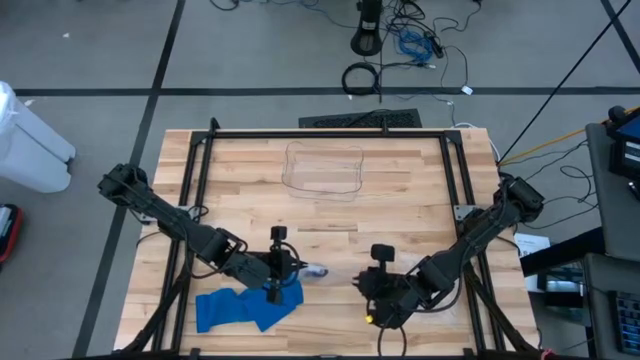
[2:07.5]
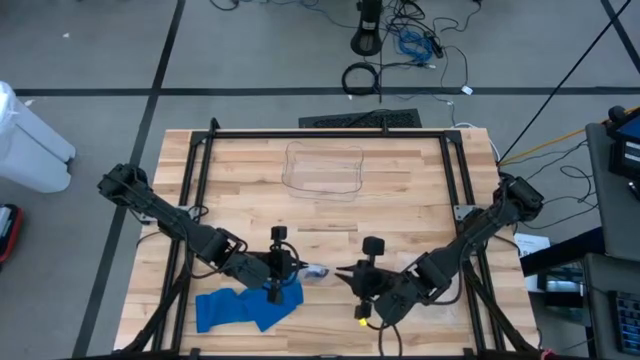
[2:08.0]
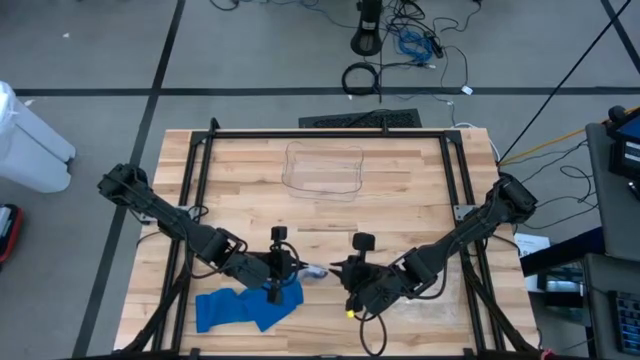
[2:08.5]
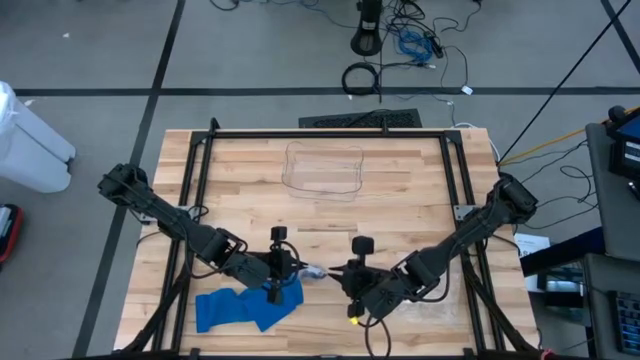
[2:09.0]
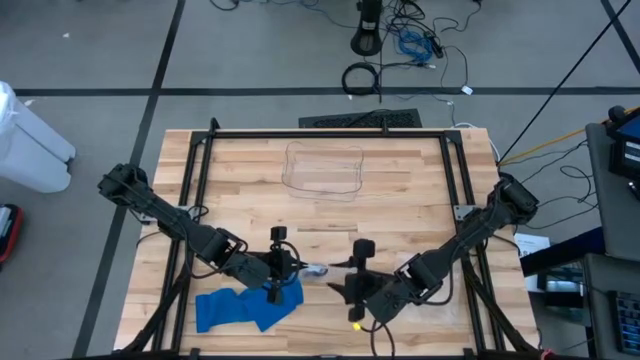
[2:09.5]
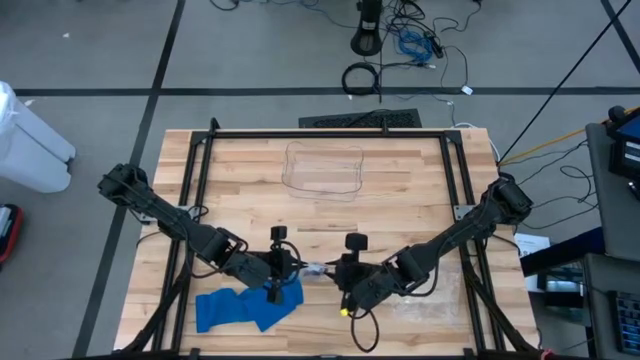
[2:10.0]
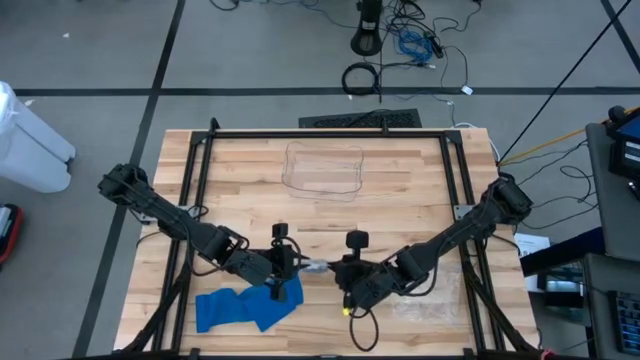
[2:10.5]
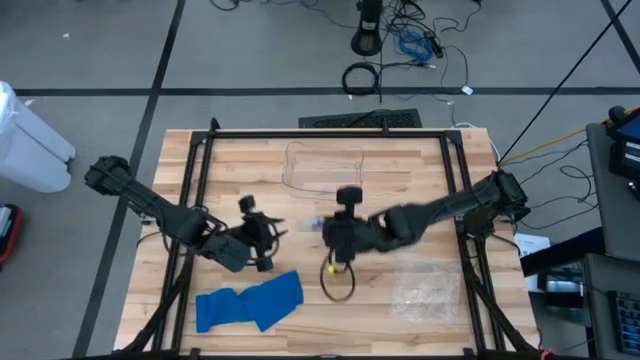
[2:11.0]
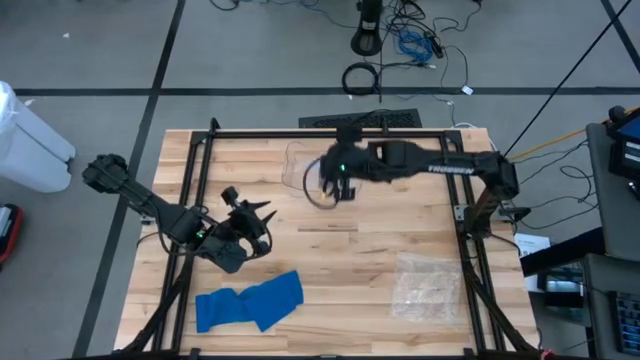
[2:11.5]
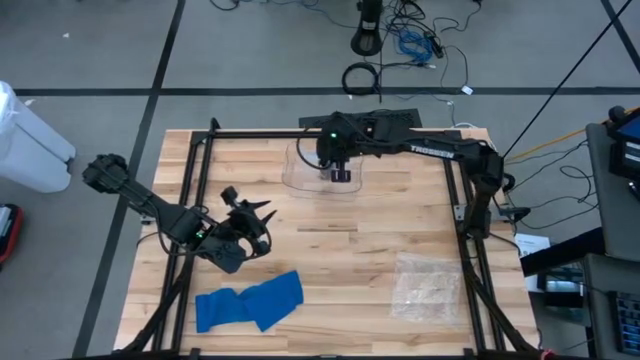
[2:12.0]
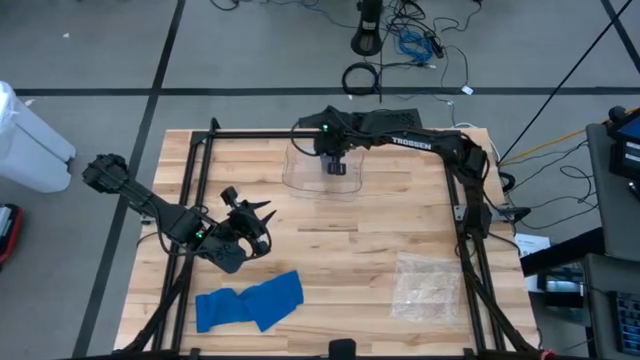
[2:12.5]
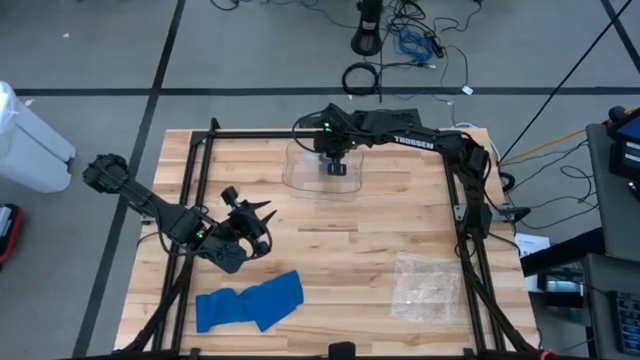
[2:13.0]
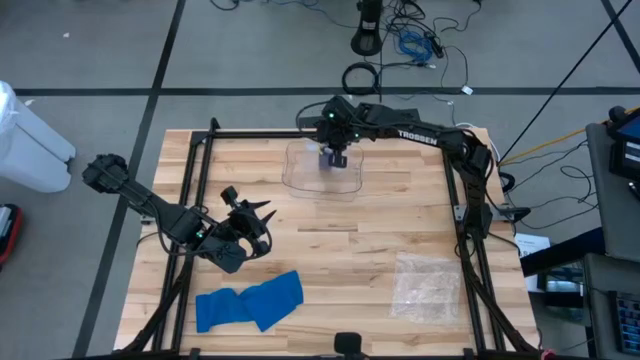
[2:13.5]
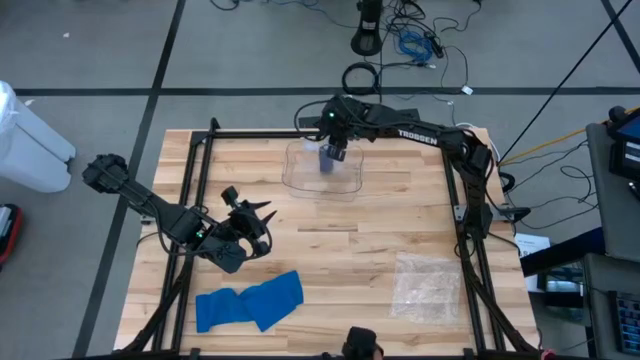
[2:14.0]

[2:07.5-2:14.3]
Task: Roll bandage
Put the transparent zip bag with the rolled purple bandage into the transparent bin

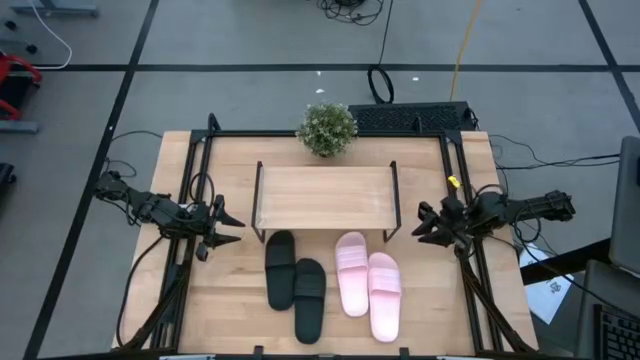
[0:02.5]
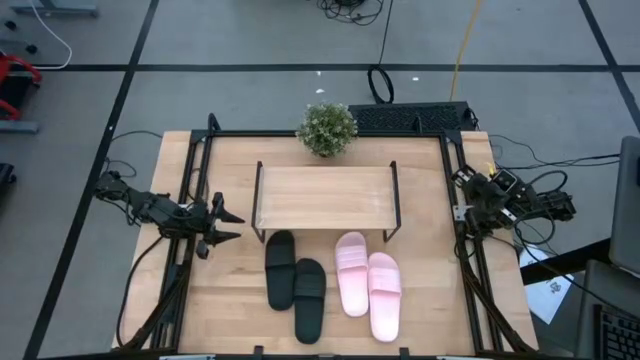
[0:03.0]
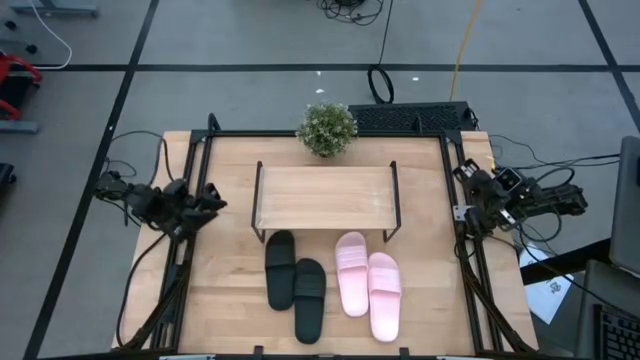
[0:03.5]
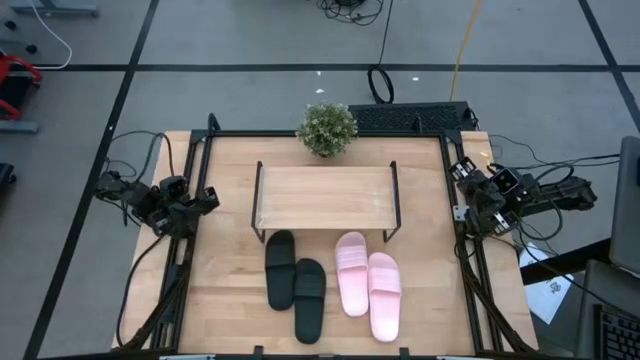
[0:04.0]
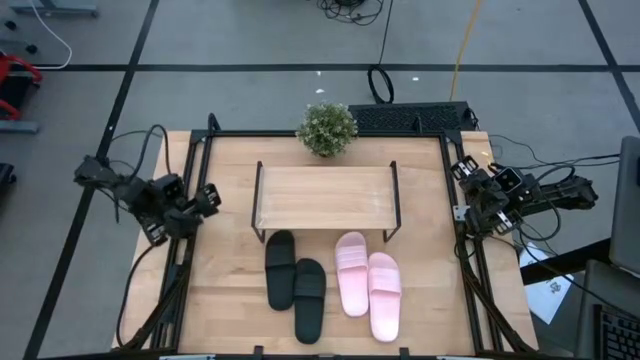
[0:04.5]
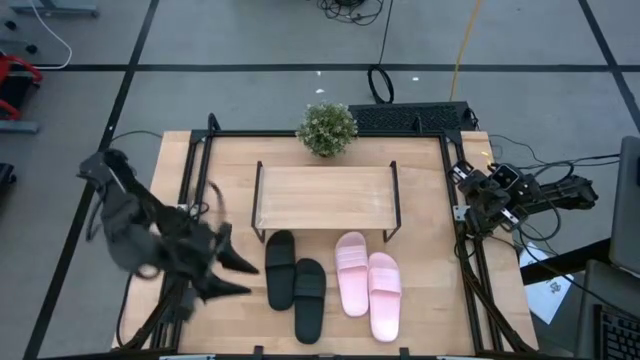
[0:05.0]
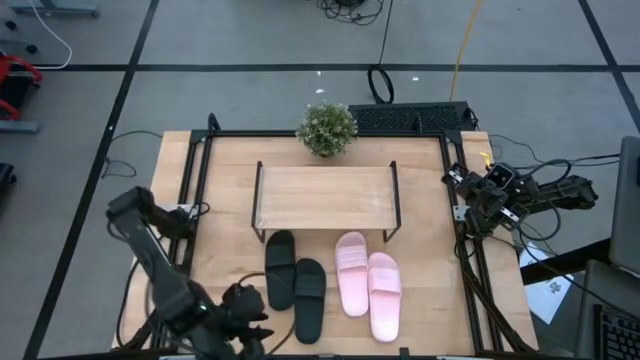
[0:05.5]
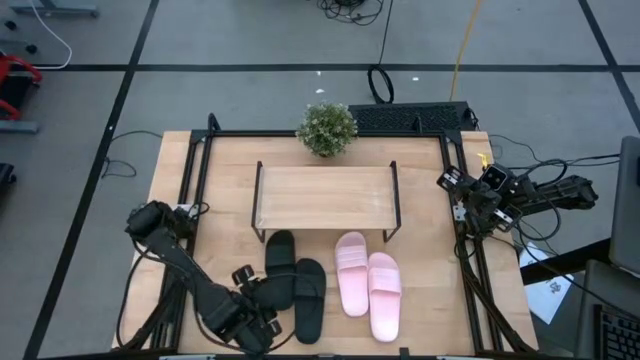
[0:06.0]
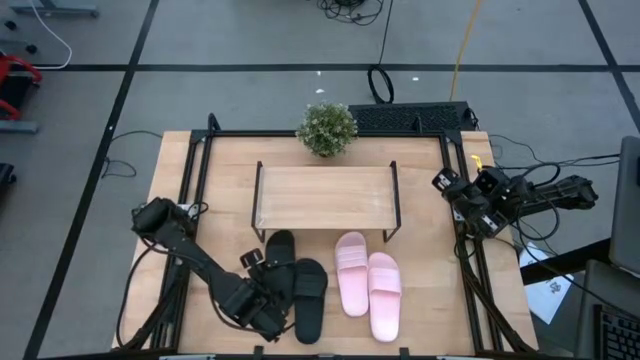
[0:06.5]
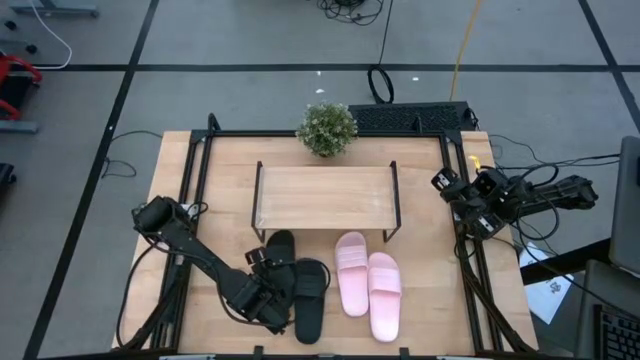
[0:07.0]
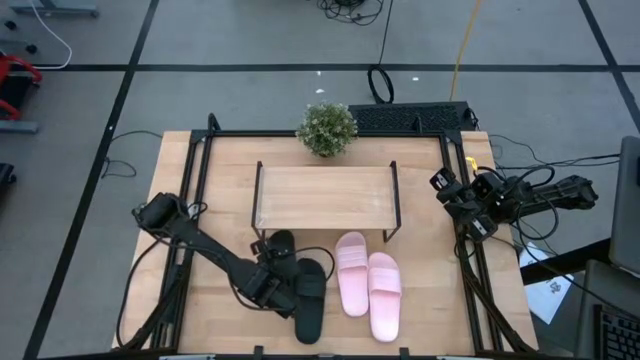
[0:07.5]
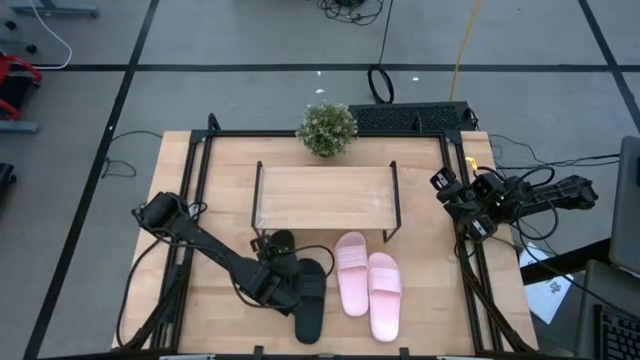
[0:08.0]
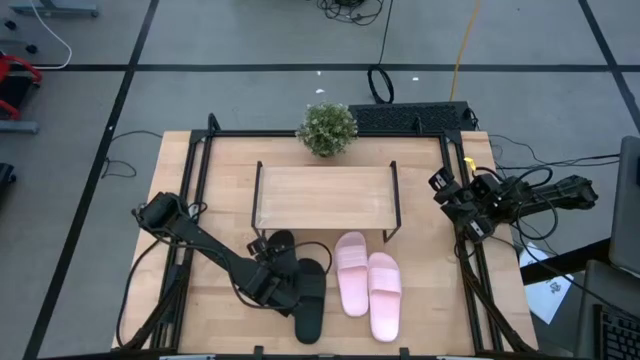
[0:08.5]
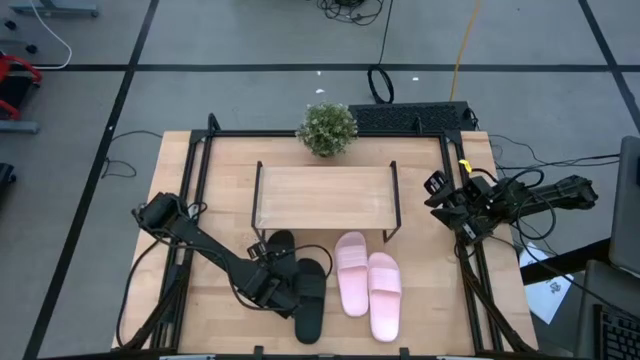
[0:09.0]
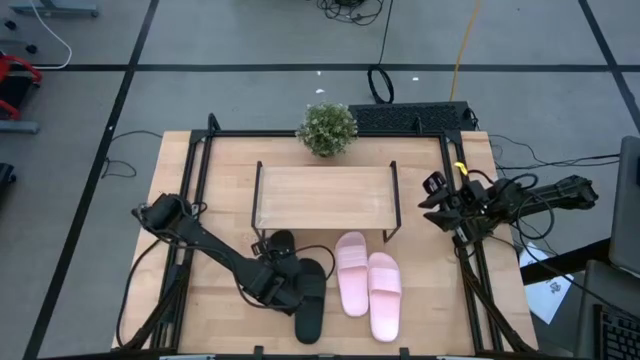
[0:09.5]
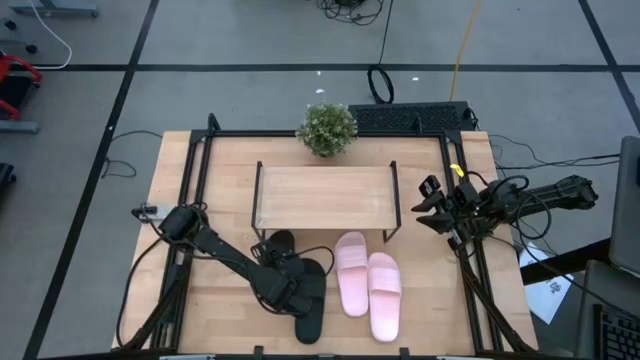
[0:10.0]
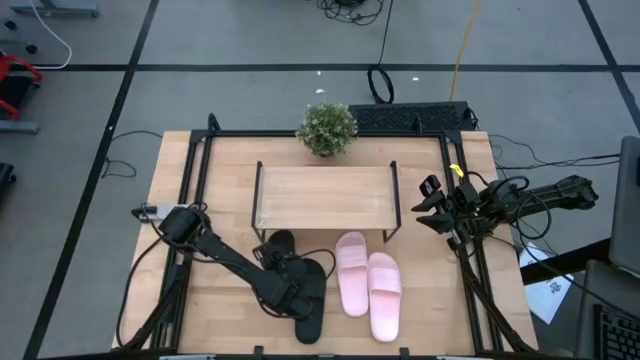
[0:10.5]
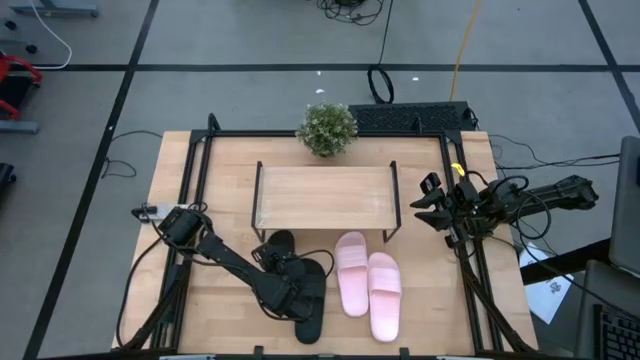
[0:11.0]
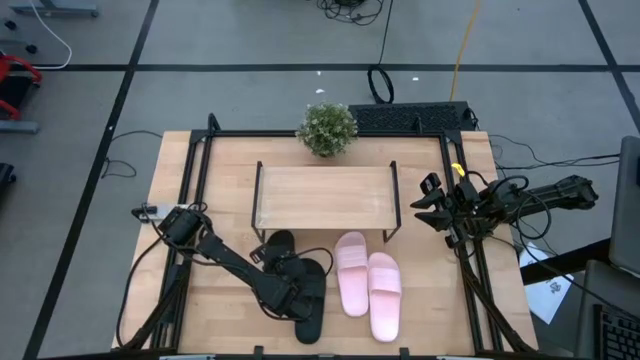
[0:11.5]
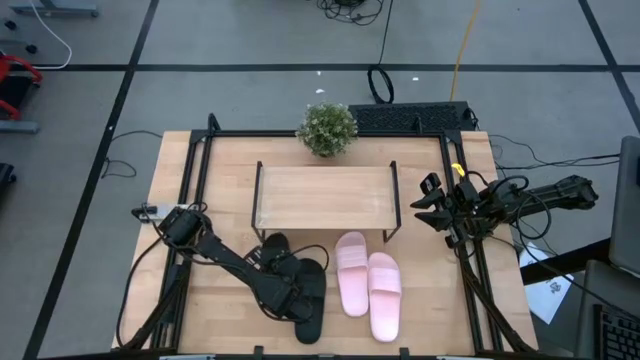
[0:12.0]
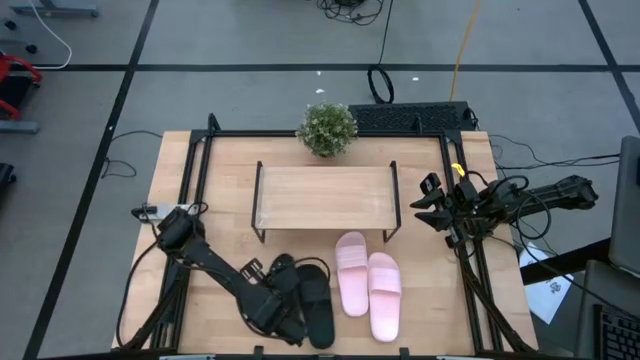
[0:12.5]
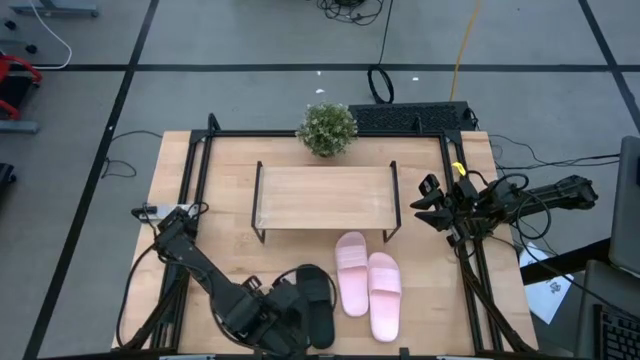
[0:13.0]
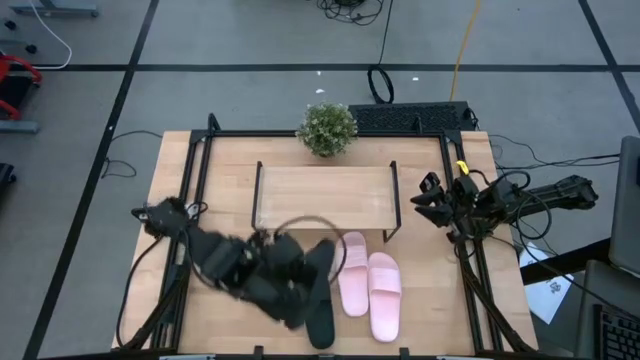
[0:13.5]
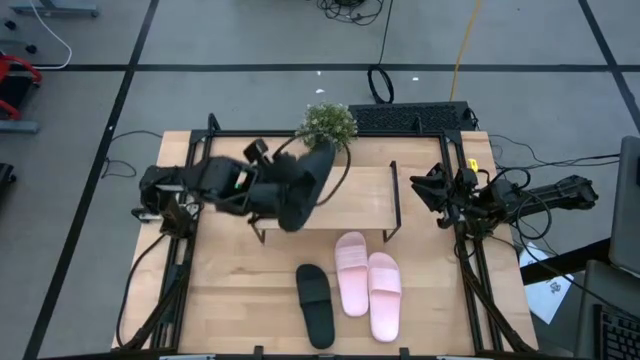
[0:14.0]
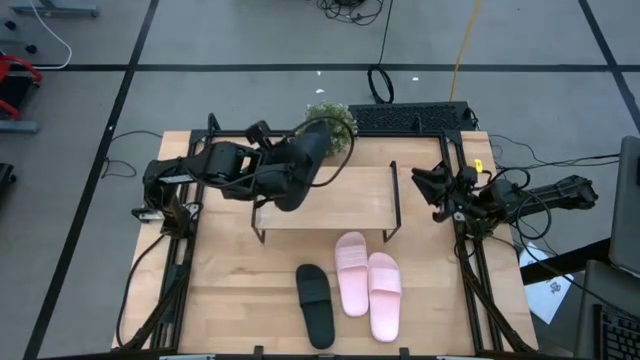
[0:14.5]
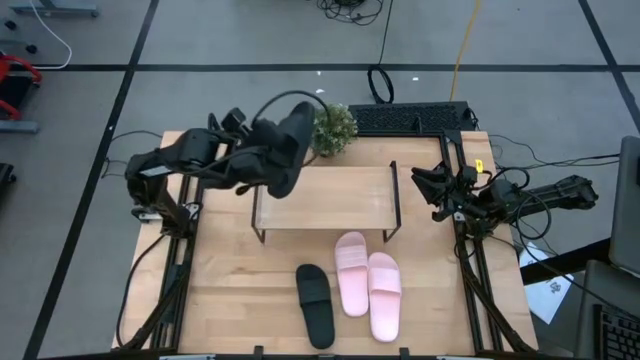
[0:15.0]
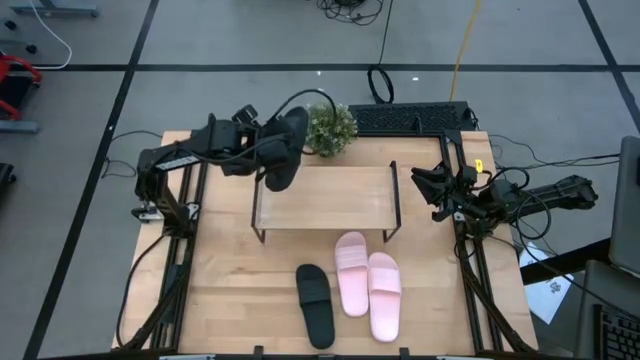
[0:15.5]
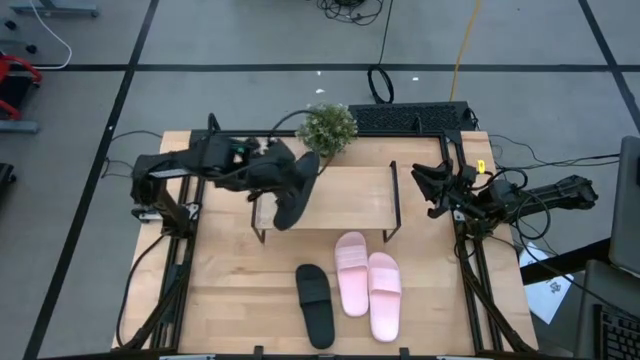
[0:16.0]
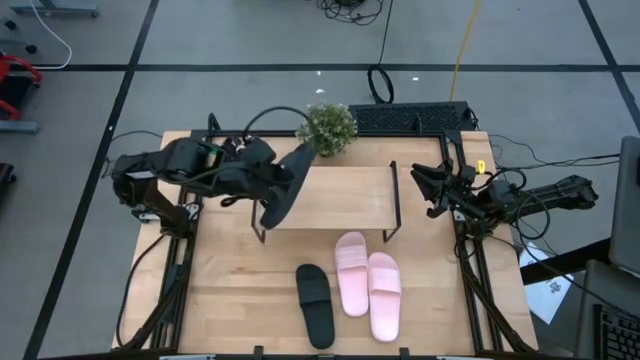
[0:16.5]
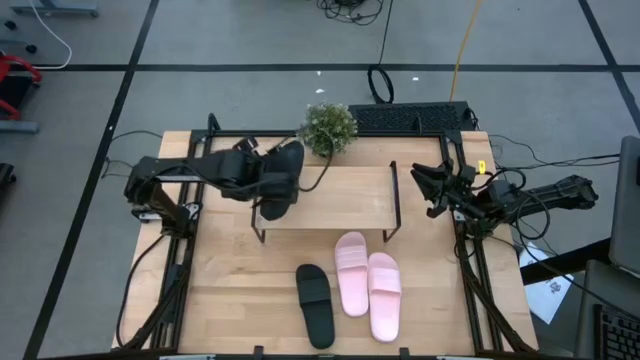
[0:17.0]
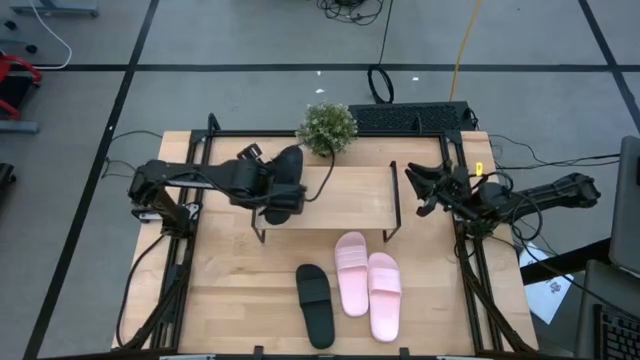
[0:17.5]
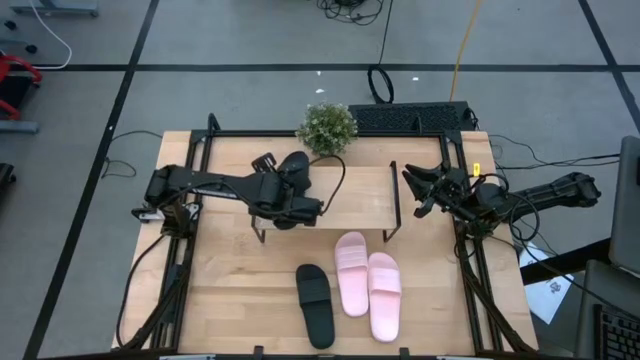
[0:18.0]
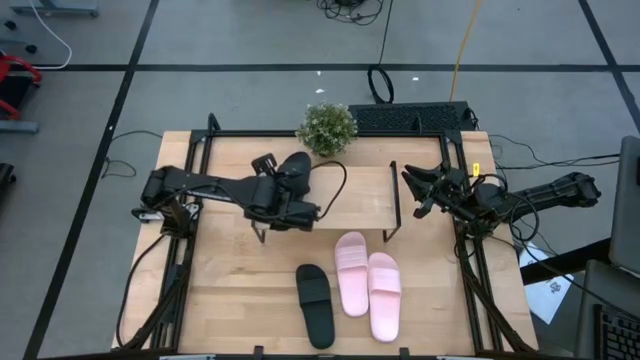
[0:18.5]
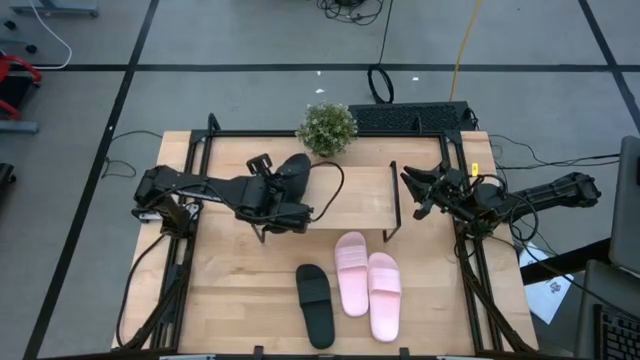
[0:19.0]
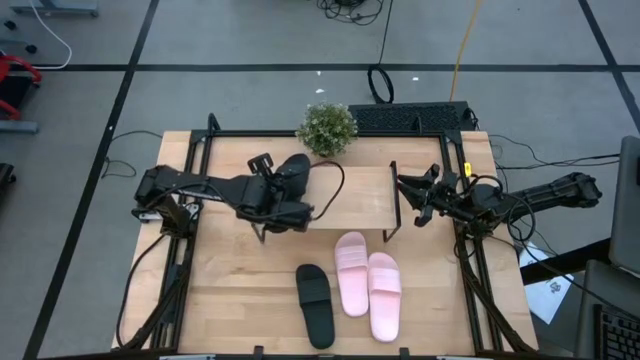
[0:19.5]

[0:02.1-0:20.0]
Task: Pick and place slides into the shelf
Put the black slide on the shelf
